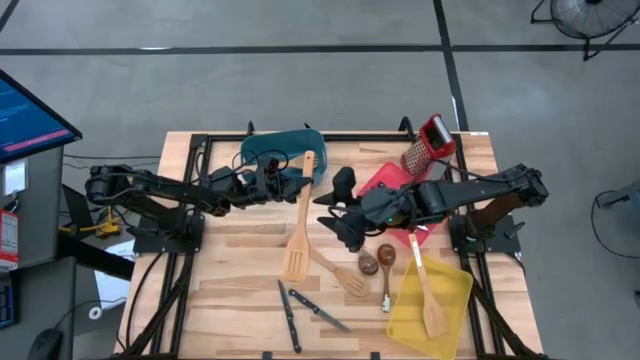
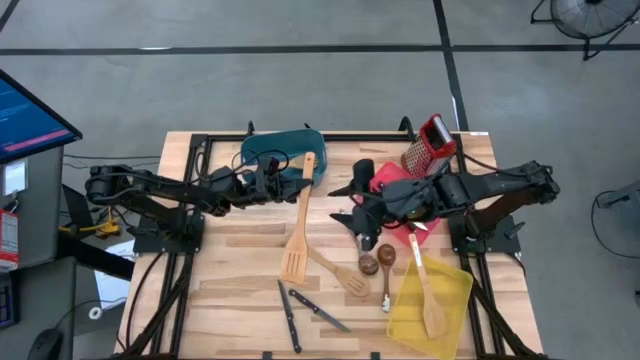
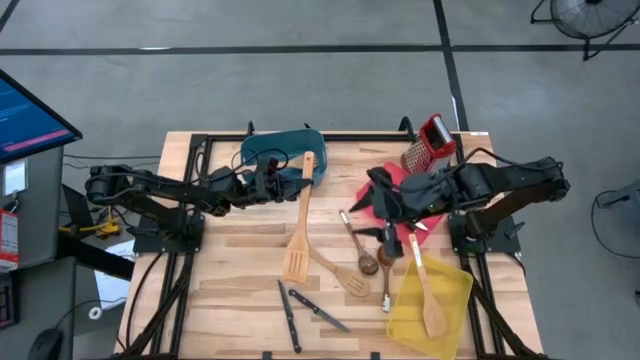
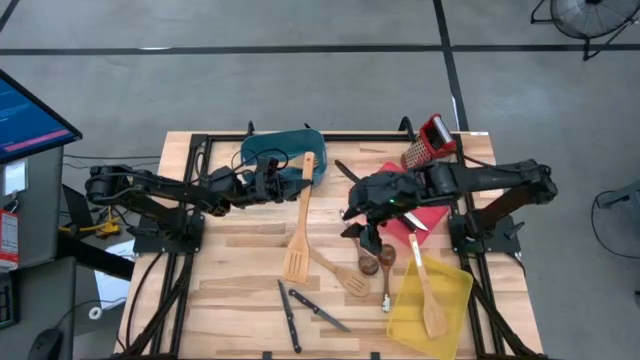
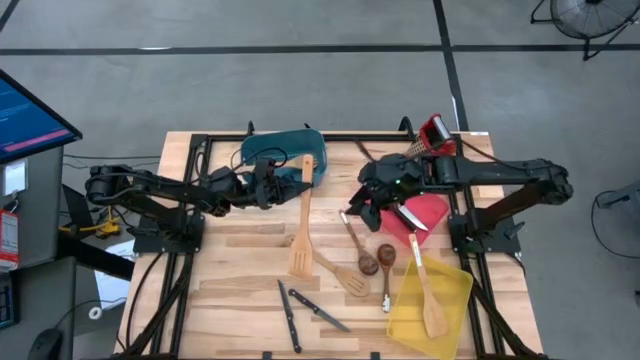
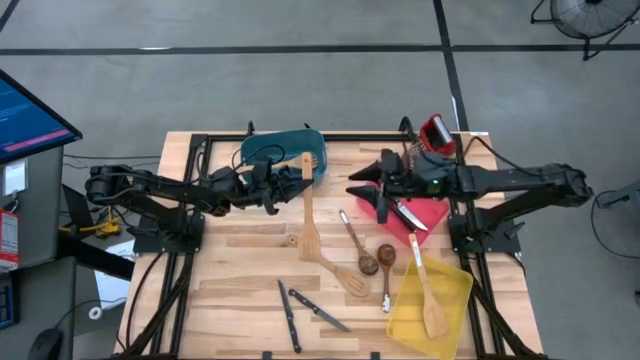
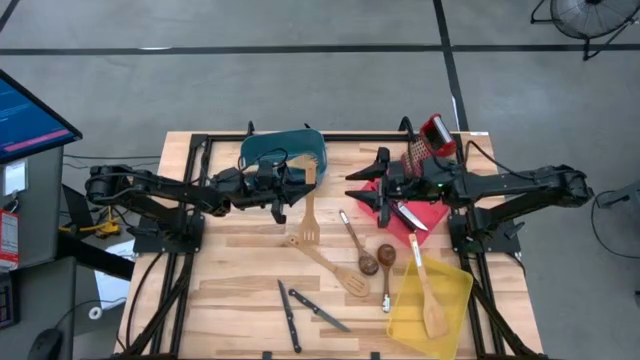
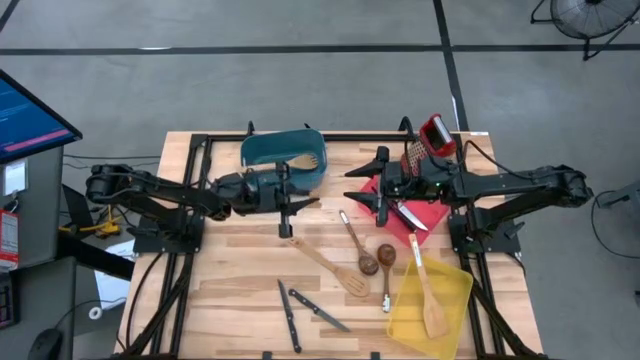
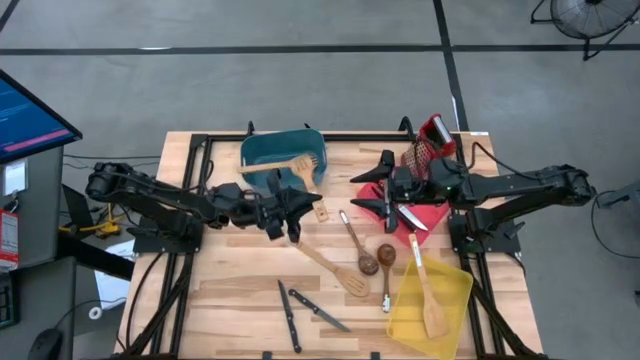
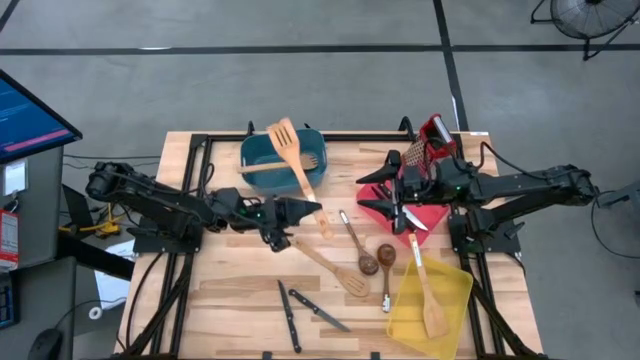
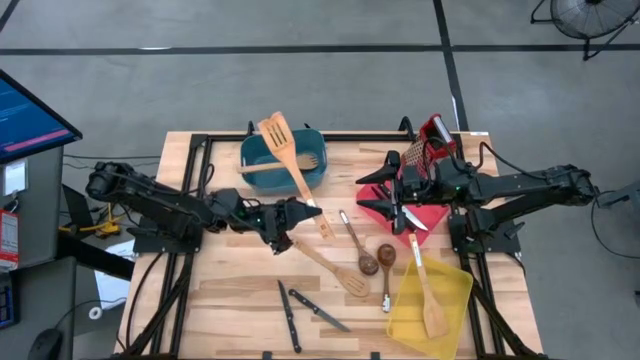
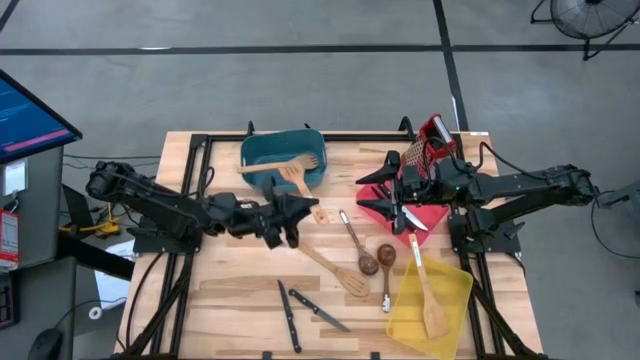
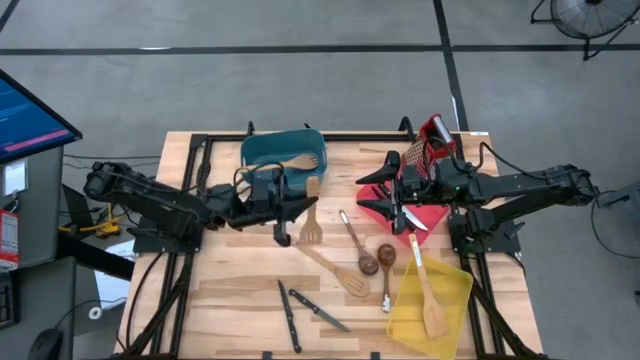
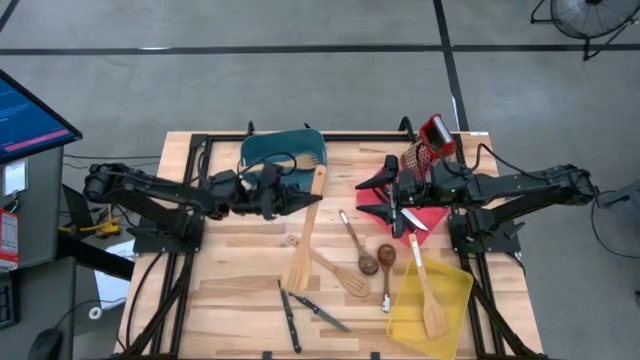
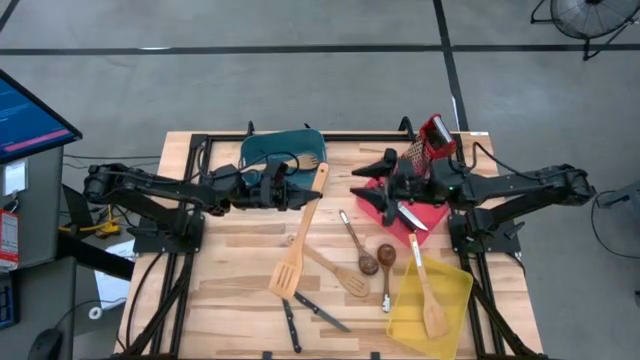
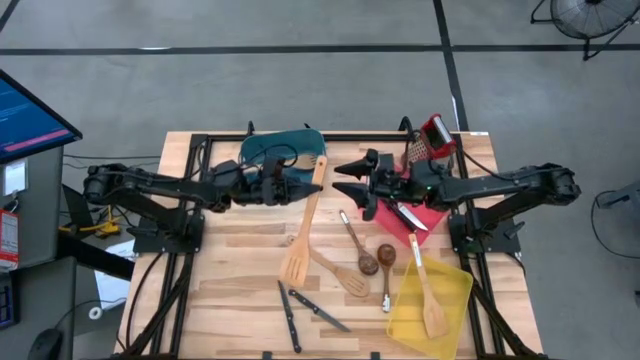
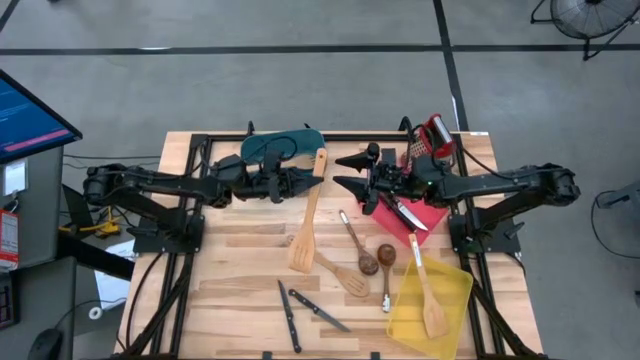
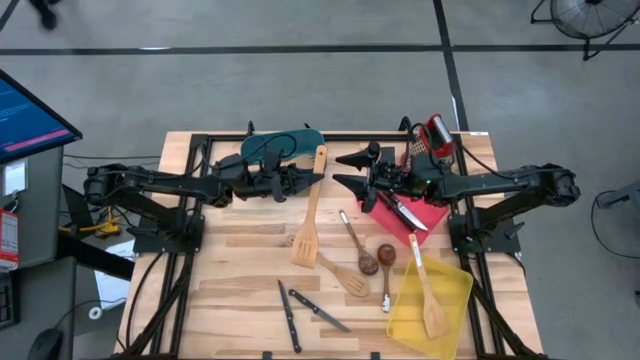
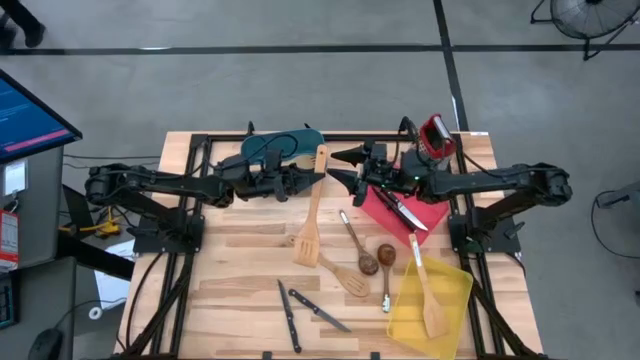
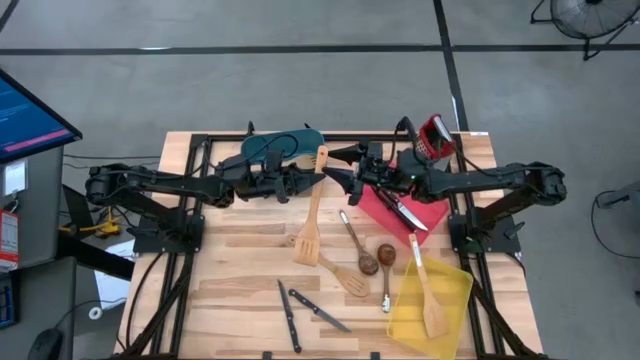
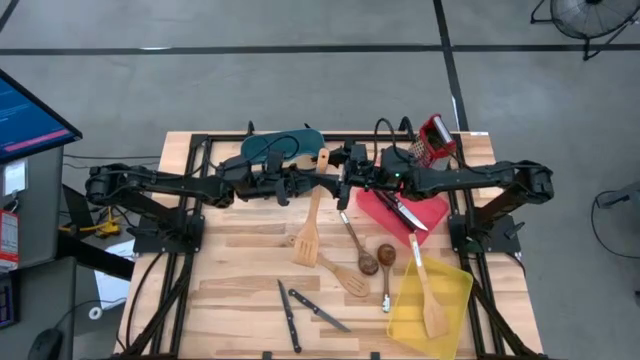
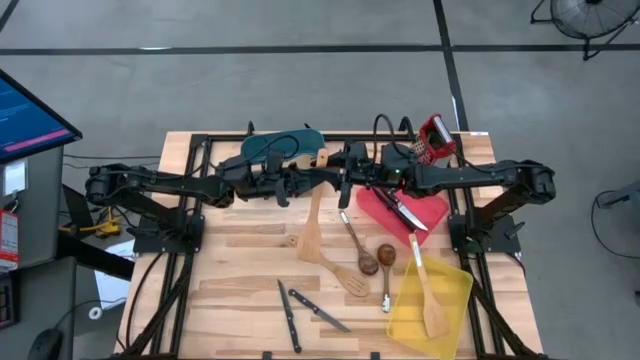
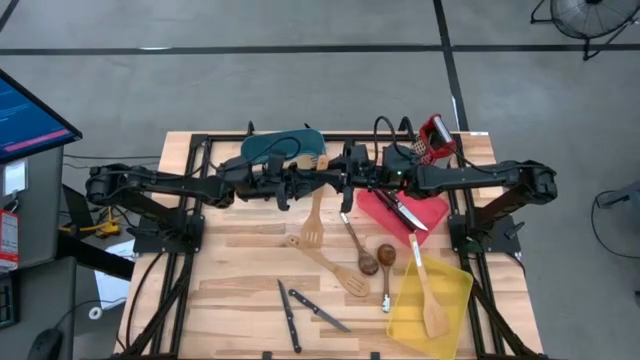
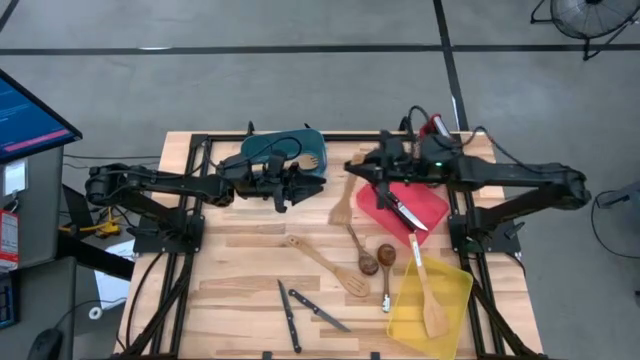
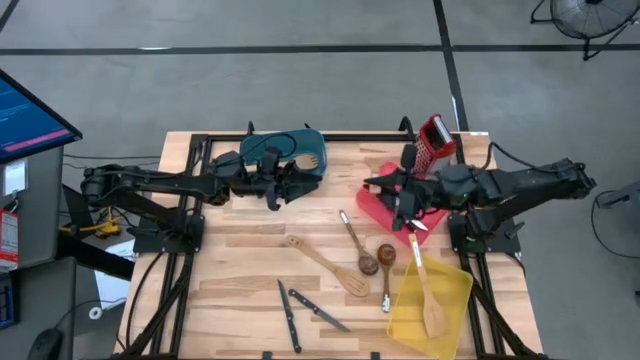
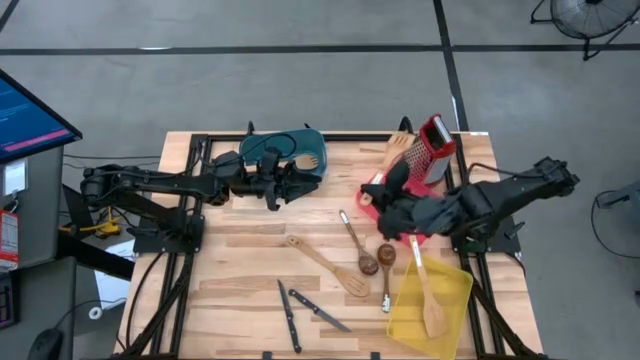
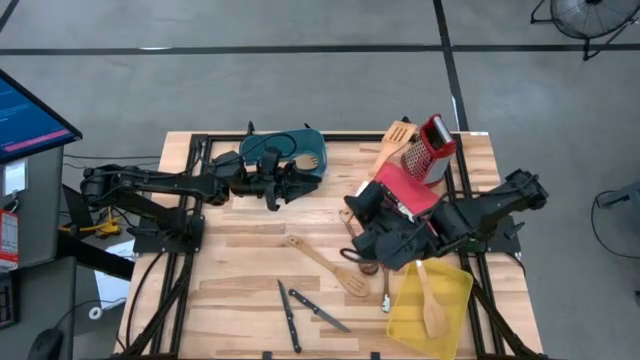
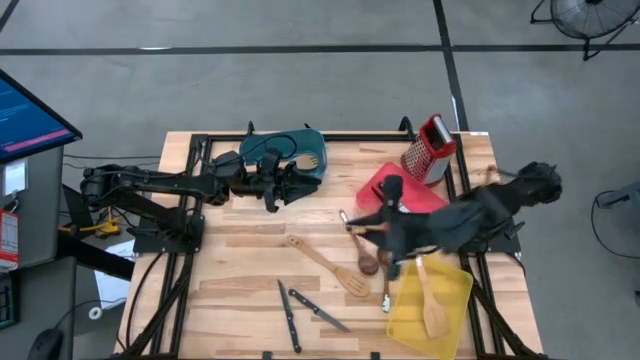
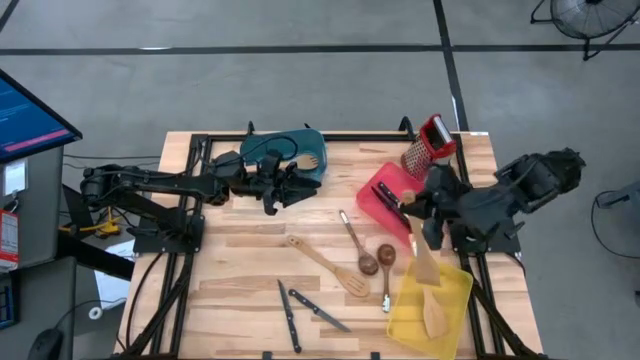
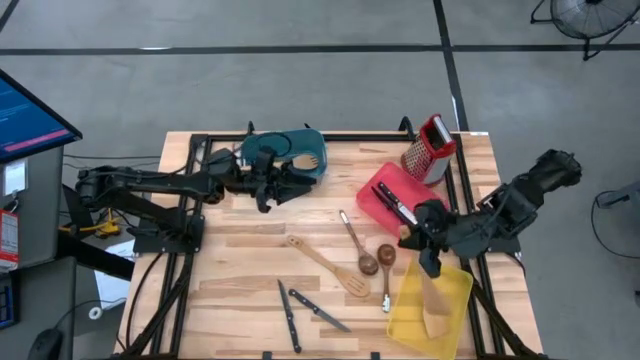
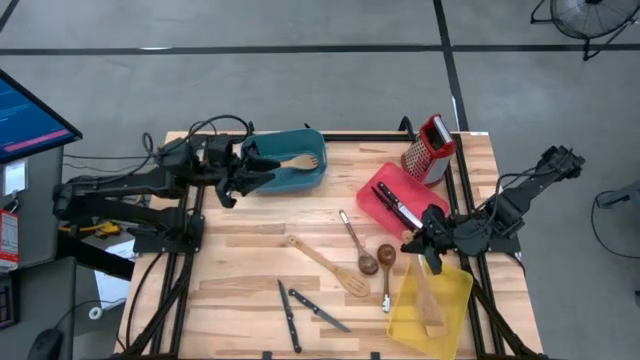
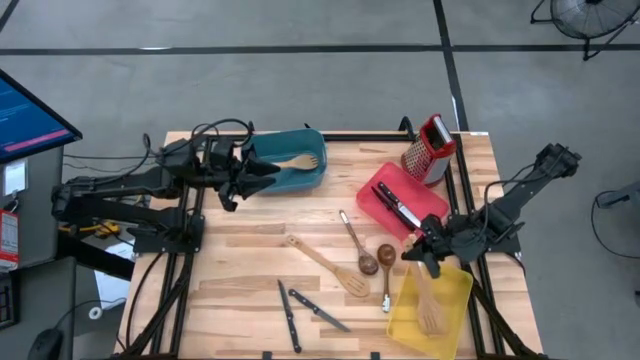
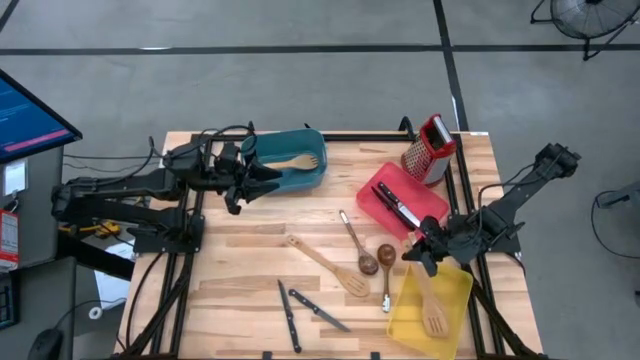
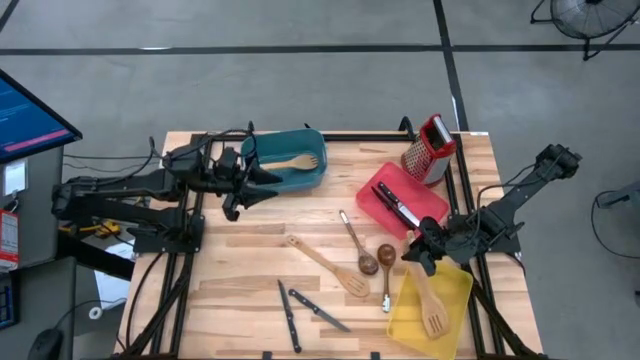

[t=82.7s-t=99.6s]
Task: Pick & Place Kitchen Items
Put the wooden slotted spatula into the yellow bin

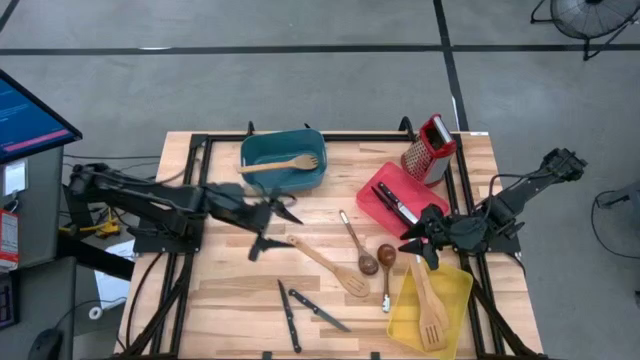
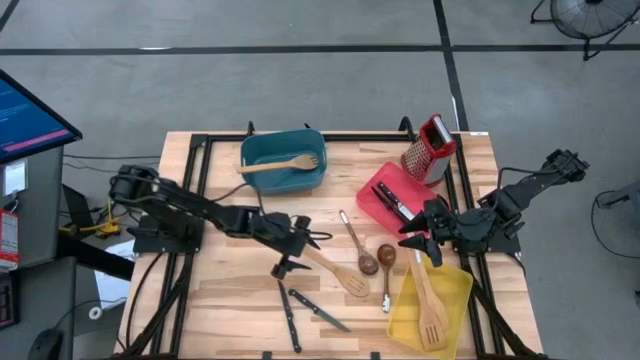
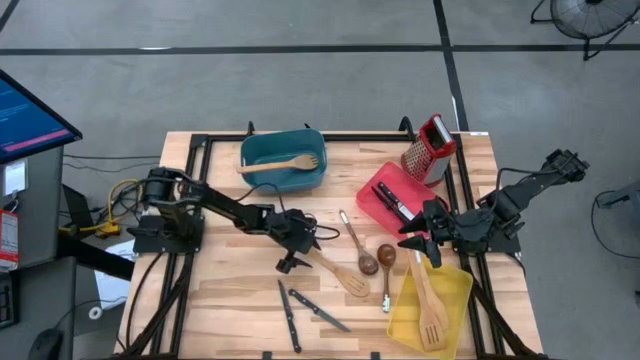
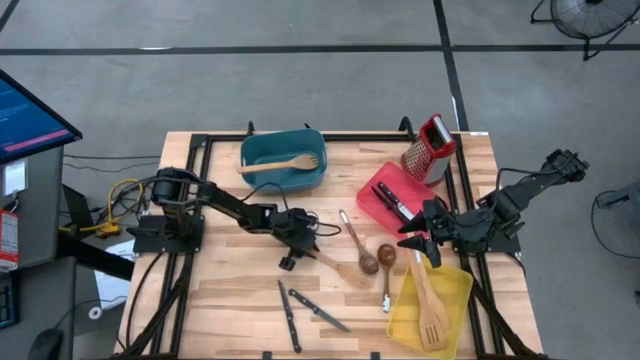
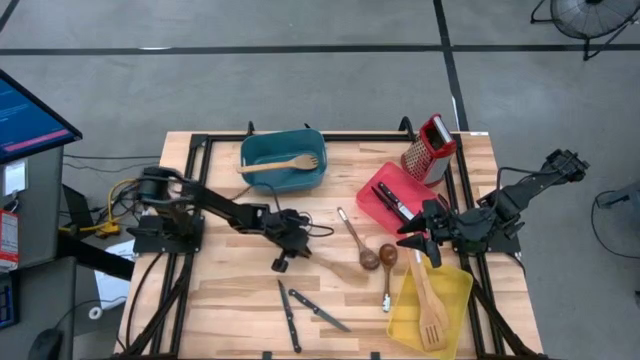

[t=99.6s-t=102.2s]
Put the wooden slotted serving spoon into the blue bin
